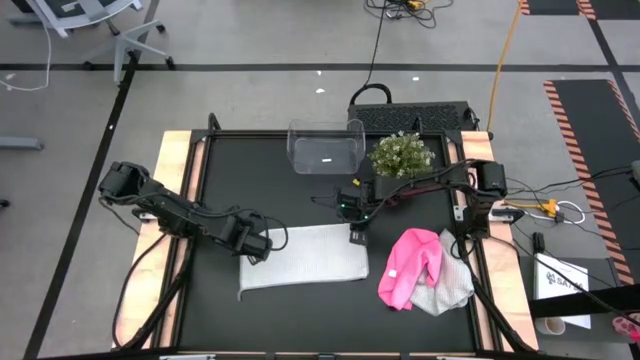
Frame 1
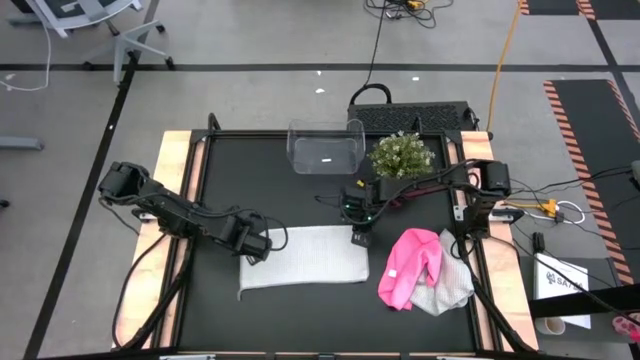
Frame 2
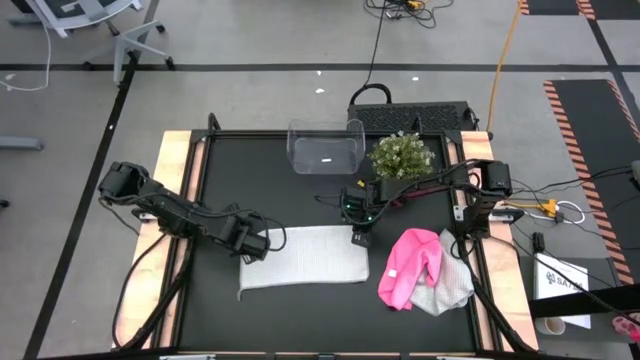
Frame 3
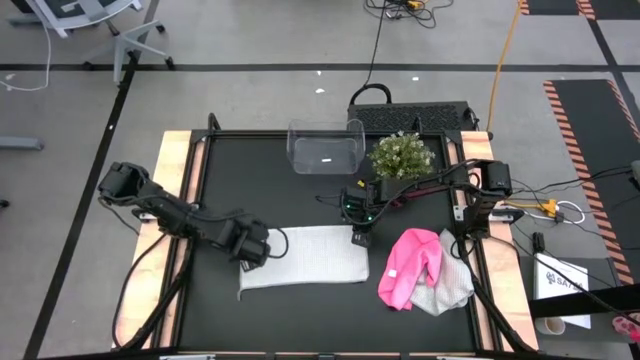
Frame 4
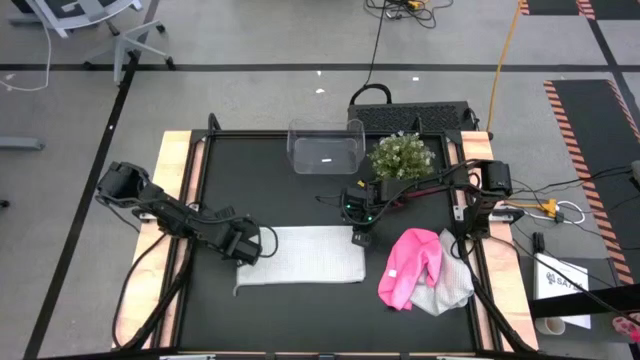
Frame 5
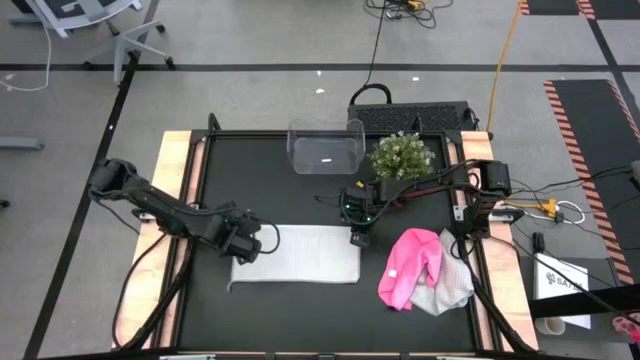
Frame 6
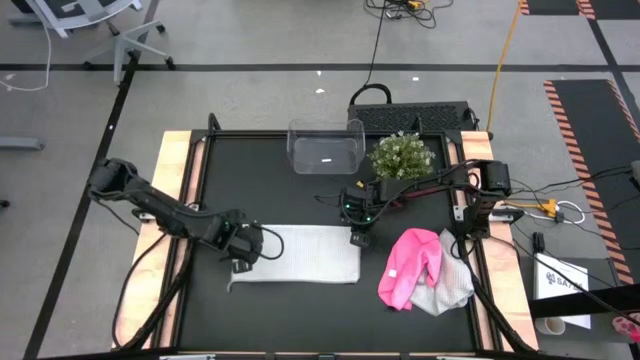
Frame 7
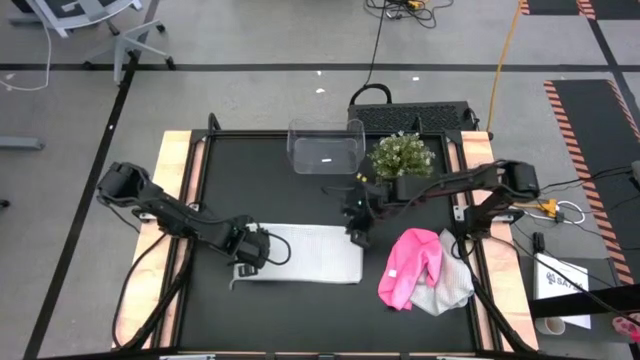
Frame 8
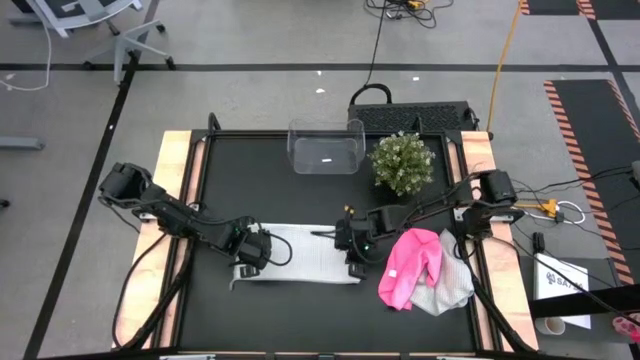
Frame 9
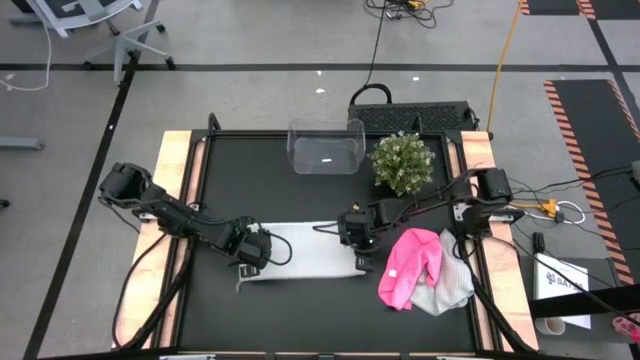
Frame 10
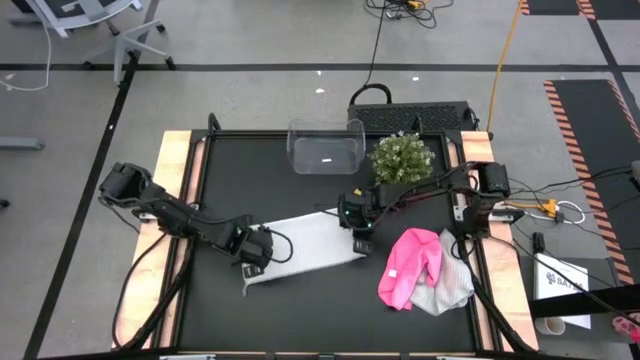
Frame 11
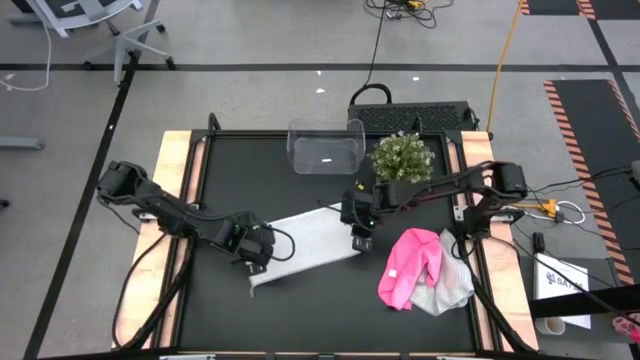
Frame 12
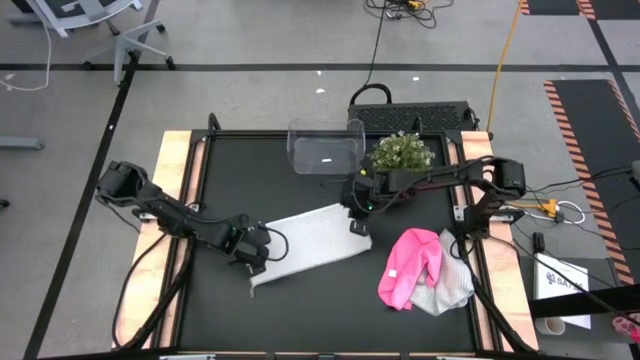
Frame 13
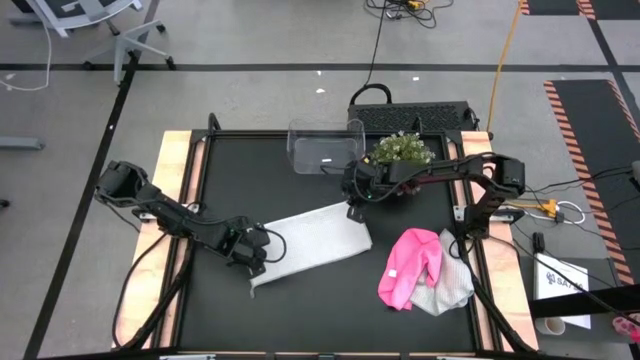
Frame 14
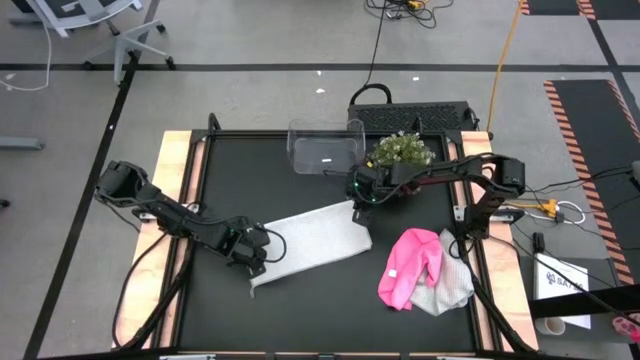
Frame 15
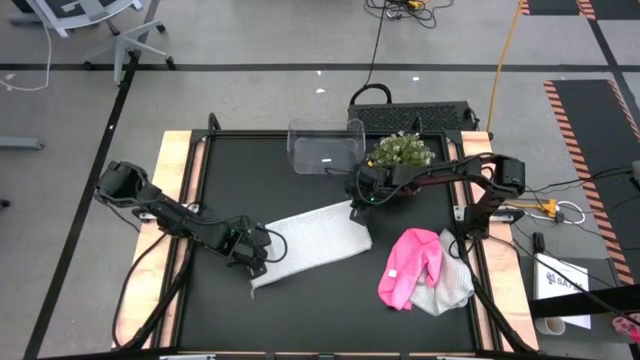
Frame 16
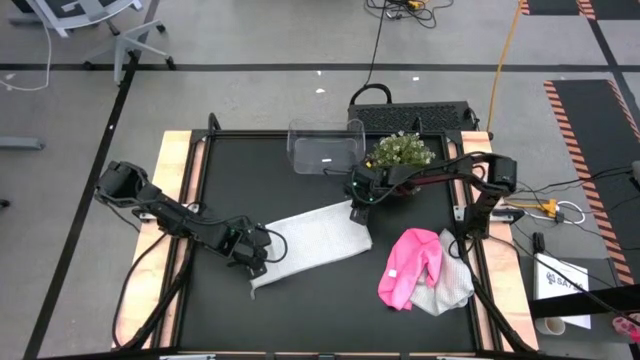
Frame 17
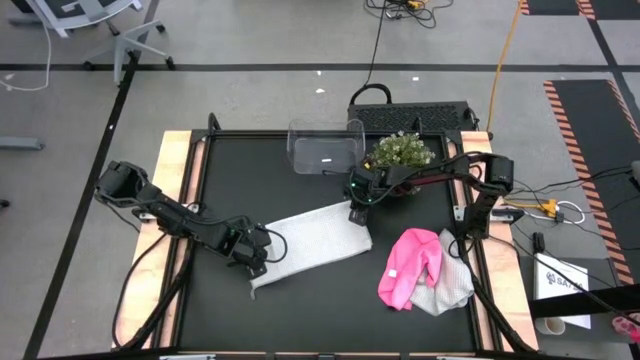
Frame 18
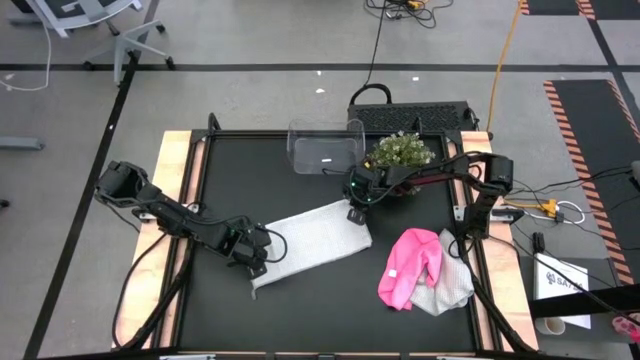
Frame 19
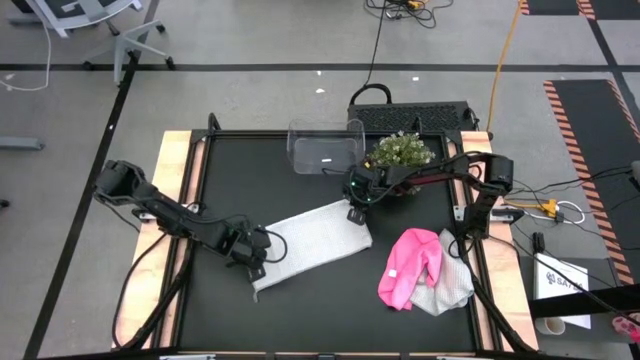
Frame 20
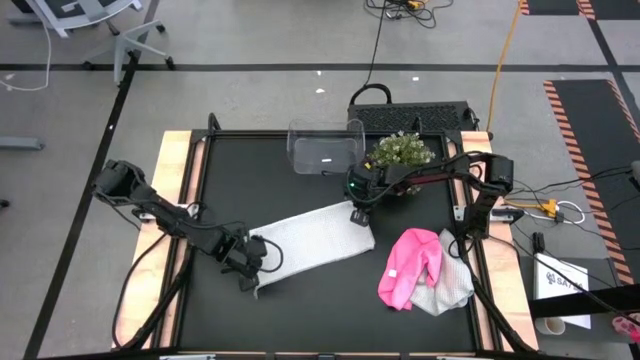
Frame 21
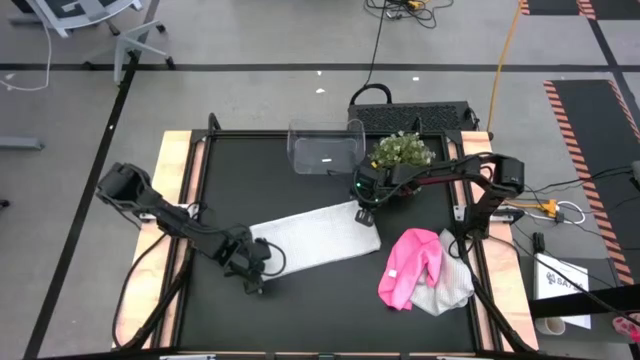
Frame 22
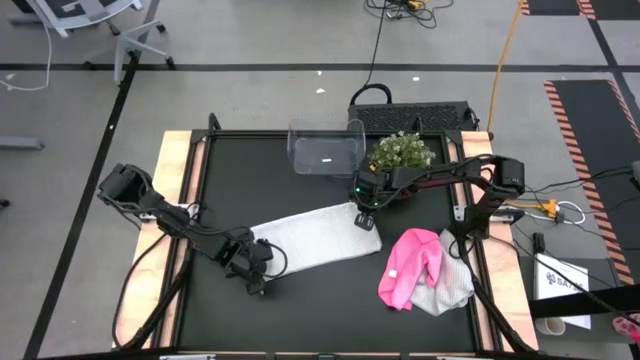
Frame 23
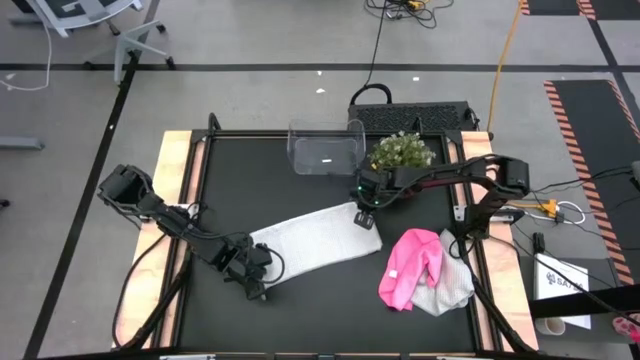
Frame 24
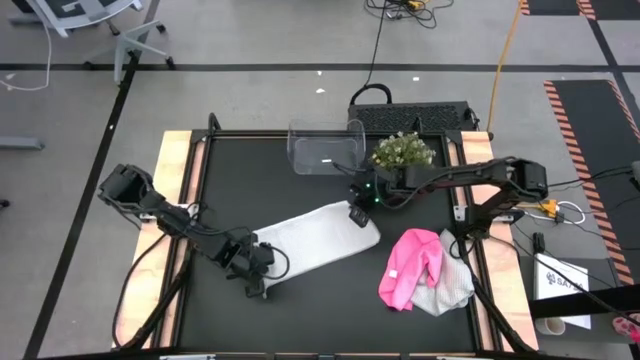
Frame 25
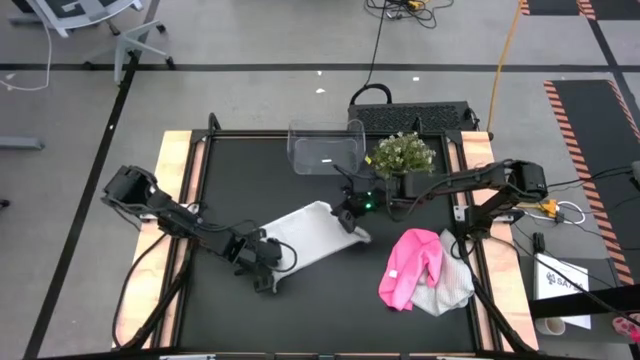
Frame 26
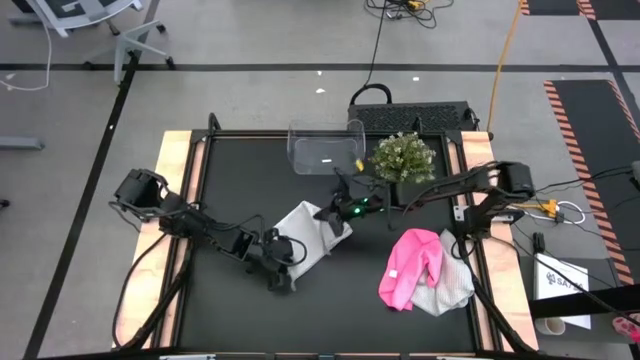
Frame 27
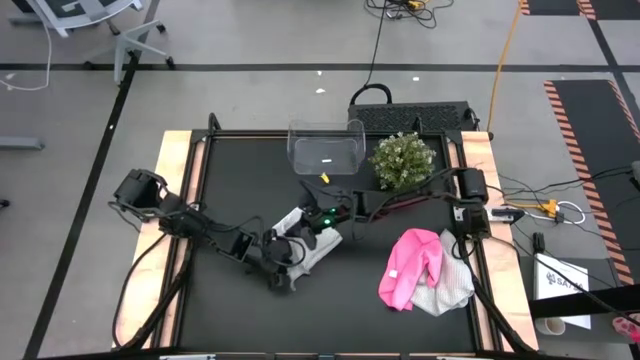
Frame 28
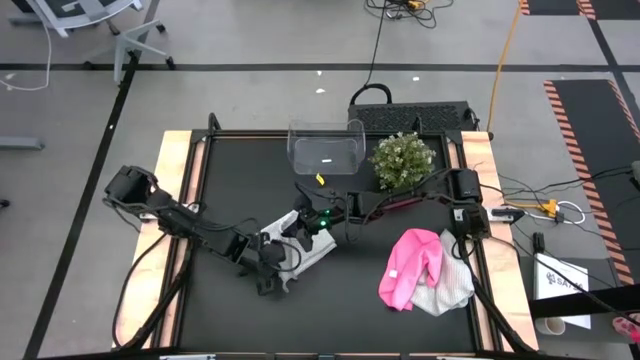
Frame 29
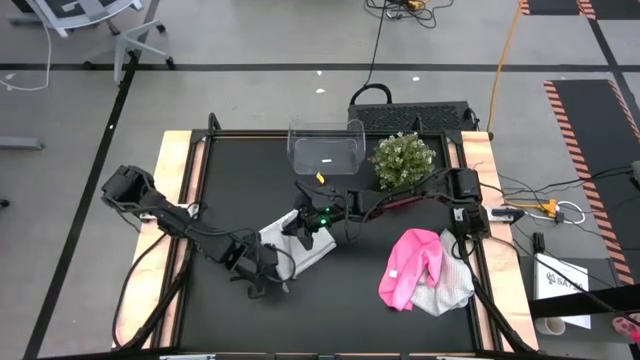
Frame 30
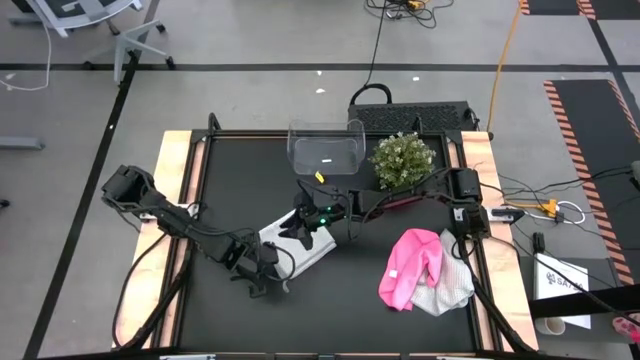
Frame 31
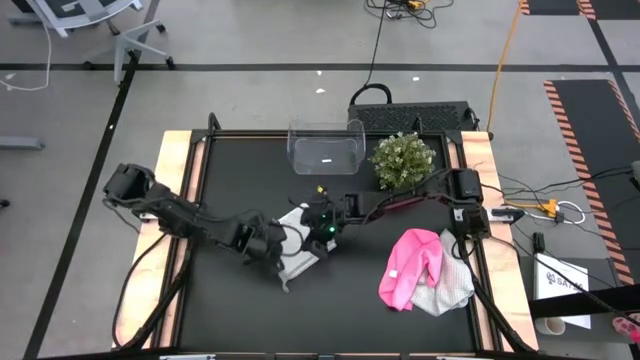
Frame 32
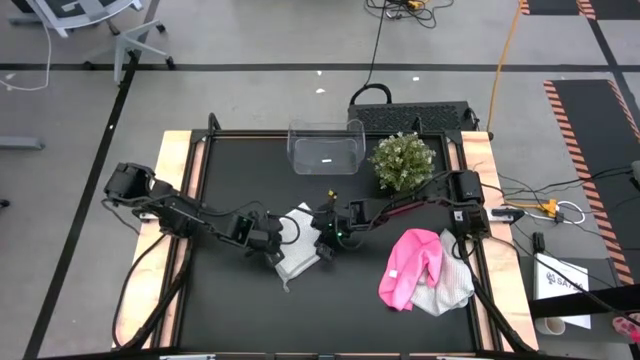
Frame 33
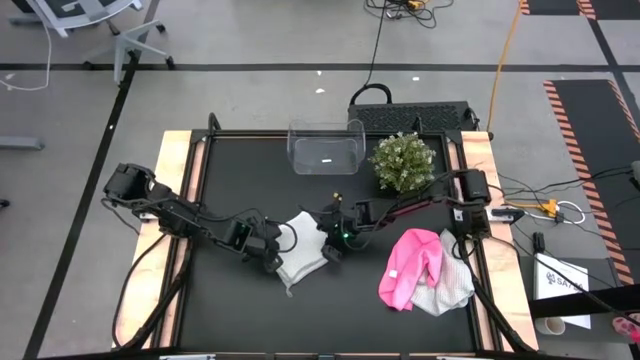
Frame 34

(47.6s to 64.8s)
Task: Fold microfiber towels
Fold the left gray towel

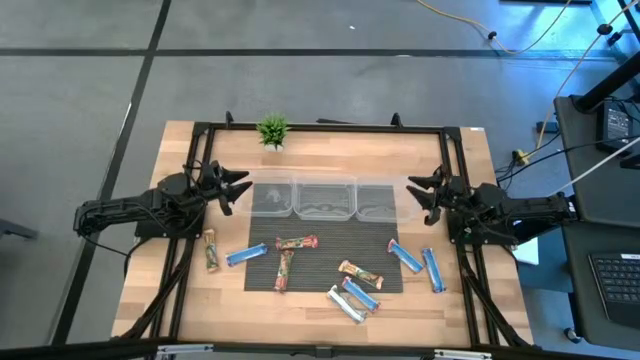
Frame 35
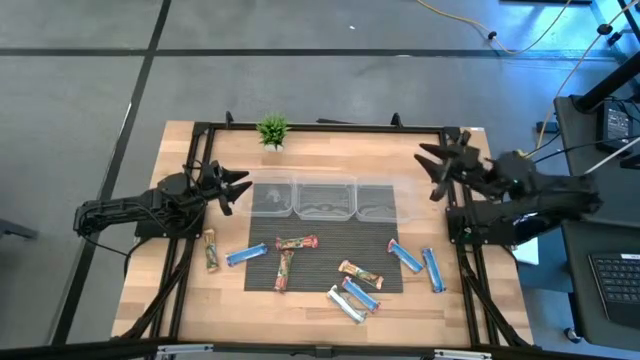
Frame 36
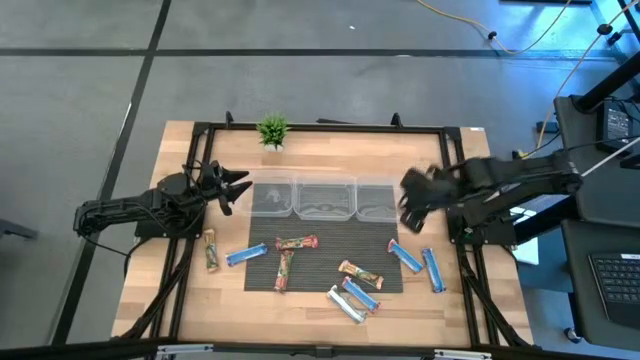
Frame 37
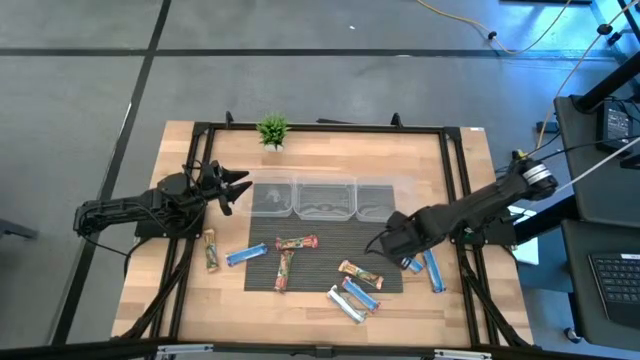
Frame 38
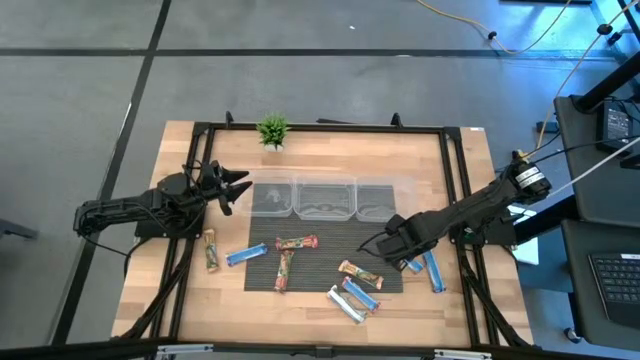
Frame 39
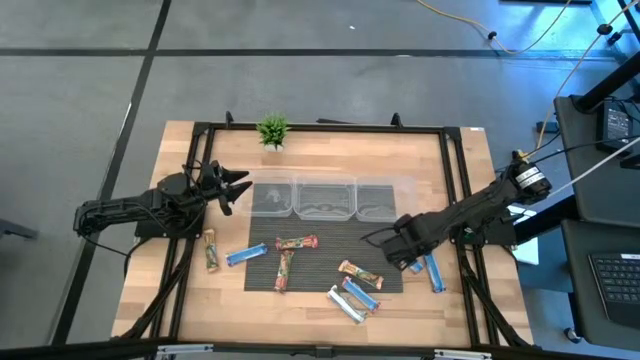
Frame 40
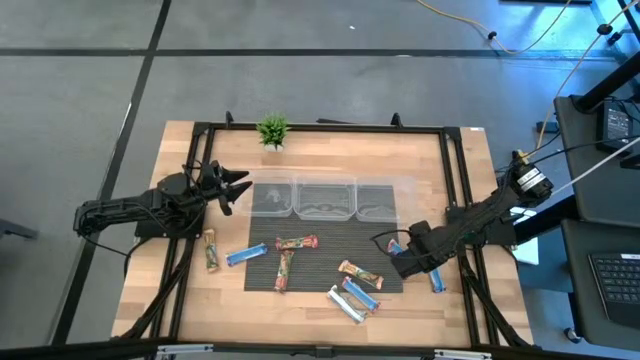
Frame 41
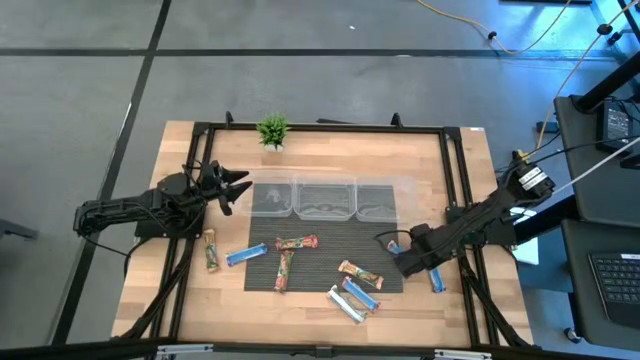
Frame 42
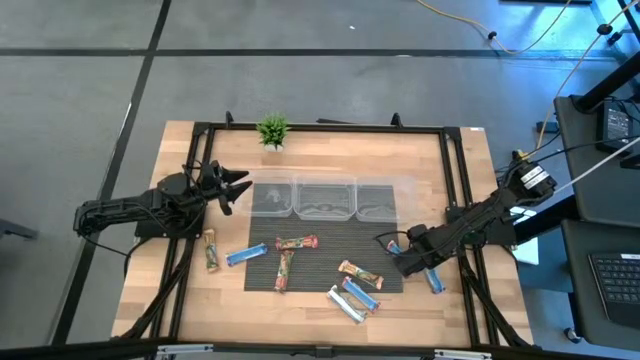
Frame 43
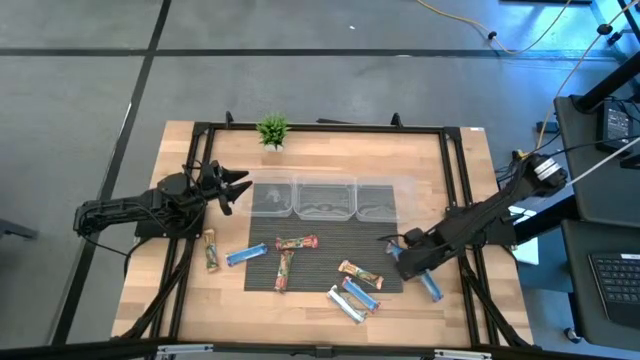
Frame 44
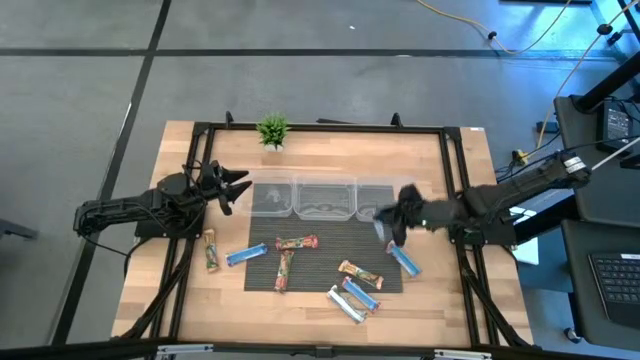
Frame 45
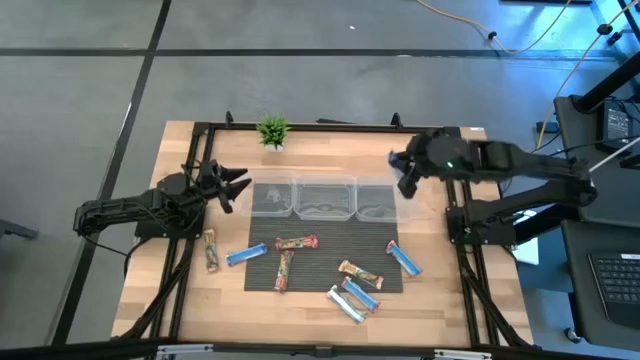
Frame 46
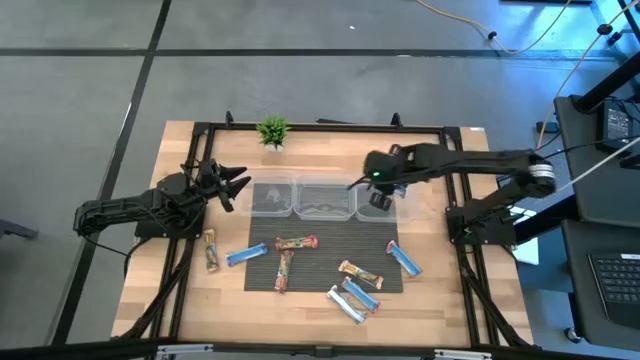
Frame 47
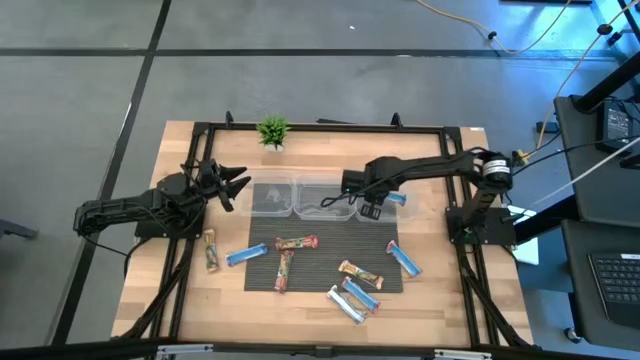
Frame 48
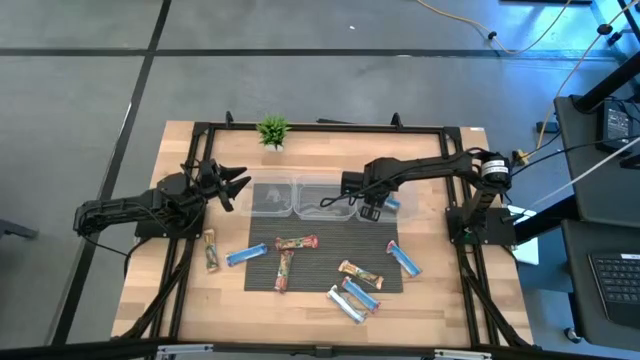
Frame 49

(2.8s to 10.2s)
Task: Pick and place Granola Bars by type
Put the blue granola bar into the right transparent bin
